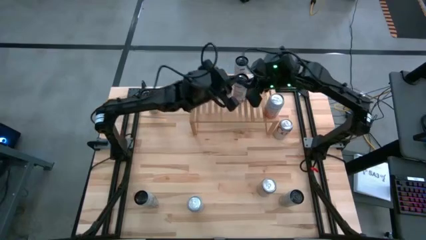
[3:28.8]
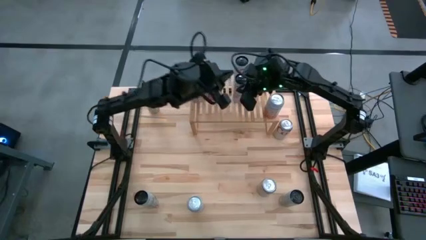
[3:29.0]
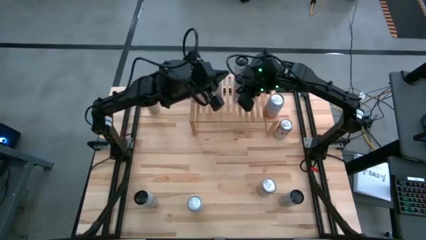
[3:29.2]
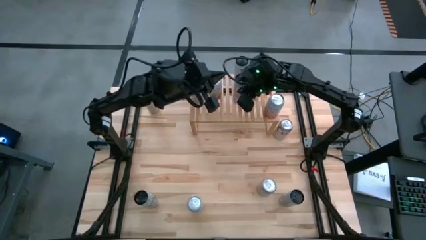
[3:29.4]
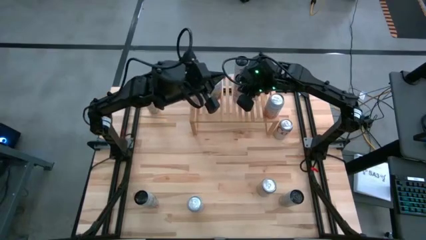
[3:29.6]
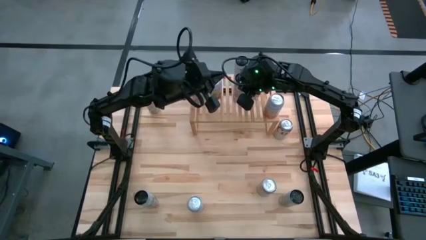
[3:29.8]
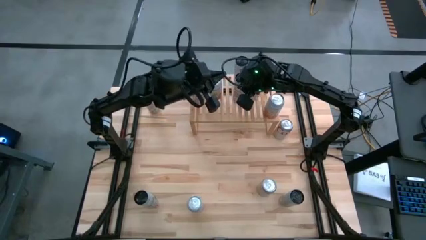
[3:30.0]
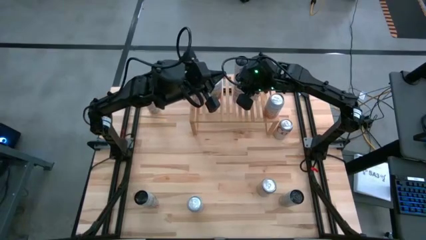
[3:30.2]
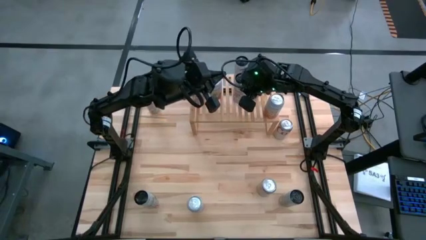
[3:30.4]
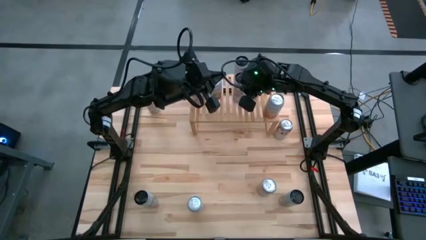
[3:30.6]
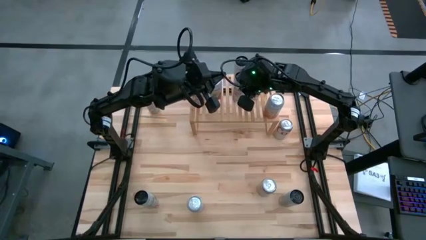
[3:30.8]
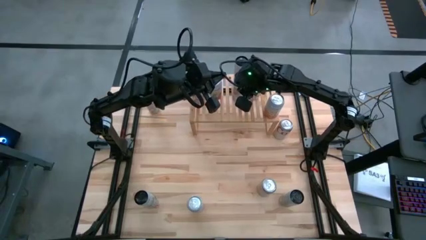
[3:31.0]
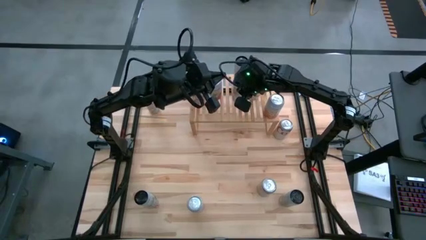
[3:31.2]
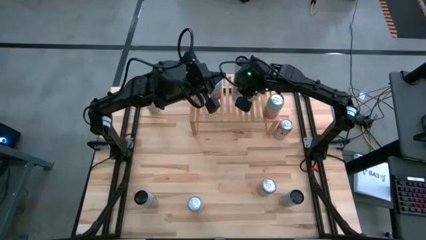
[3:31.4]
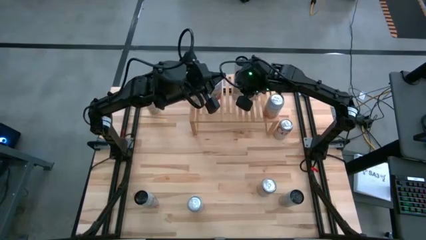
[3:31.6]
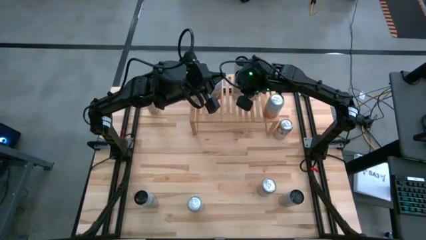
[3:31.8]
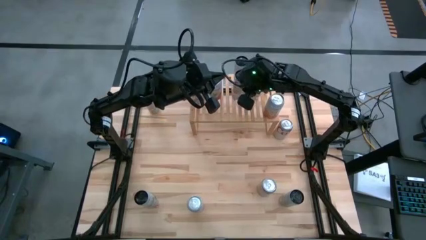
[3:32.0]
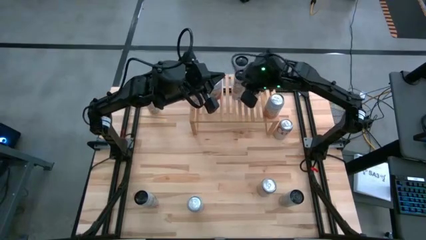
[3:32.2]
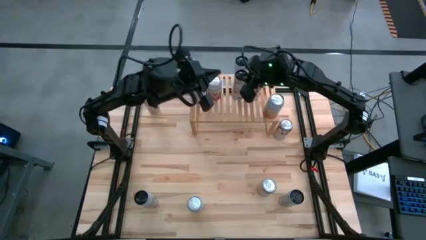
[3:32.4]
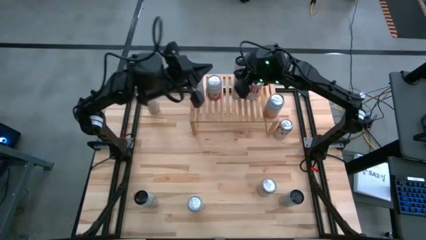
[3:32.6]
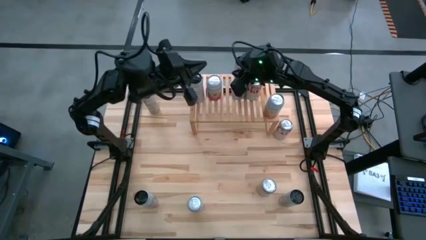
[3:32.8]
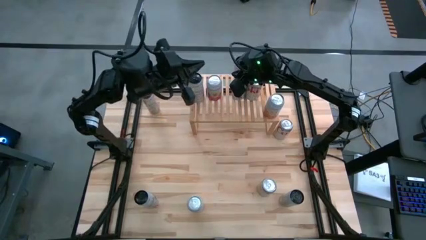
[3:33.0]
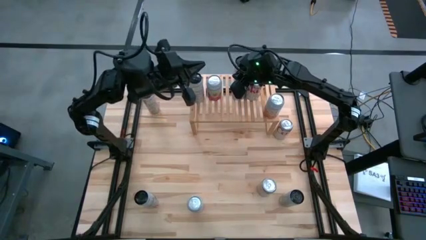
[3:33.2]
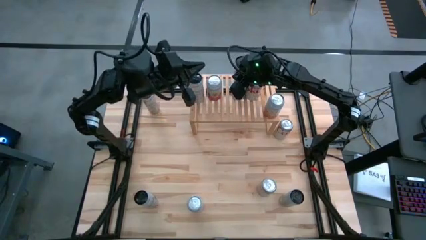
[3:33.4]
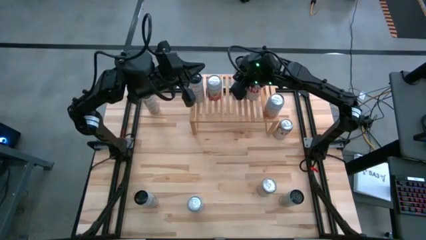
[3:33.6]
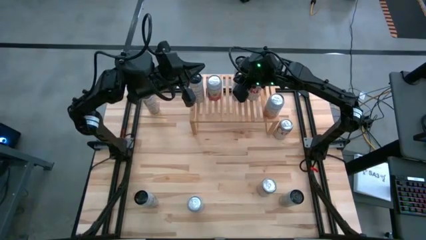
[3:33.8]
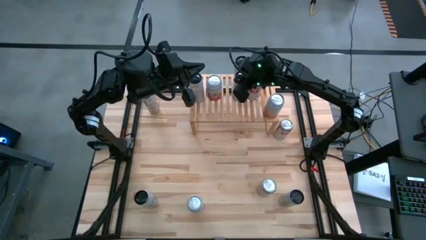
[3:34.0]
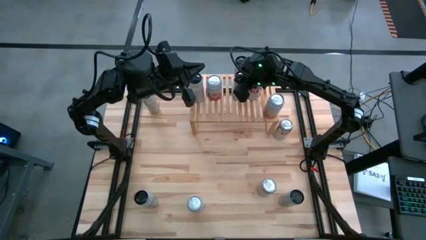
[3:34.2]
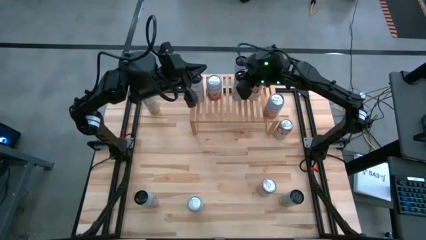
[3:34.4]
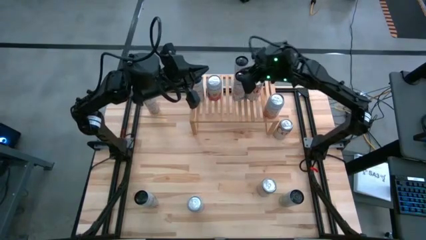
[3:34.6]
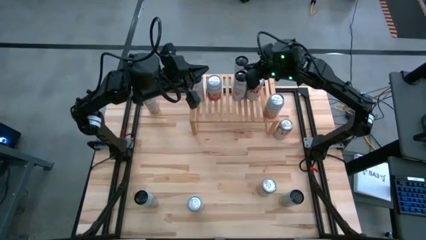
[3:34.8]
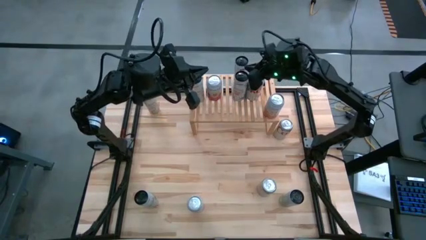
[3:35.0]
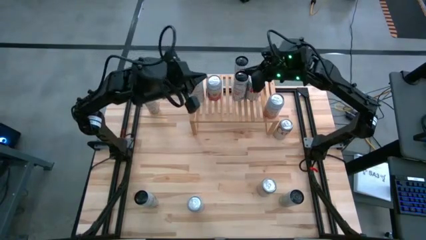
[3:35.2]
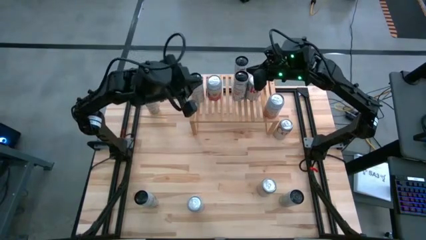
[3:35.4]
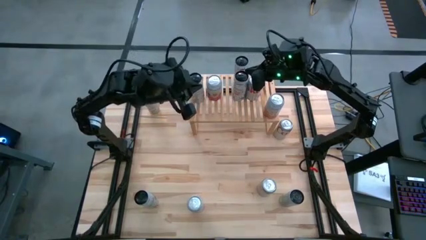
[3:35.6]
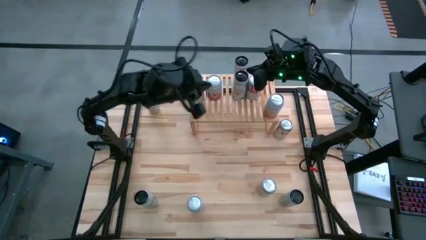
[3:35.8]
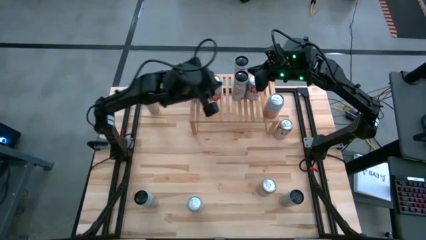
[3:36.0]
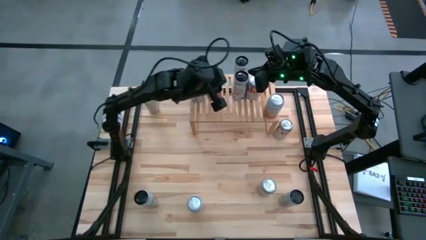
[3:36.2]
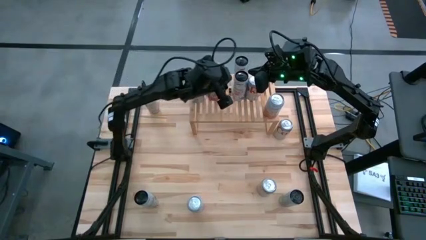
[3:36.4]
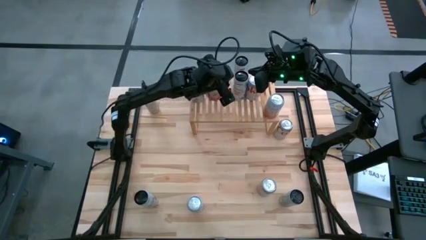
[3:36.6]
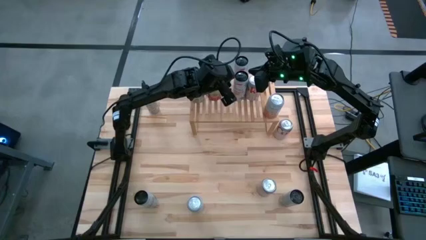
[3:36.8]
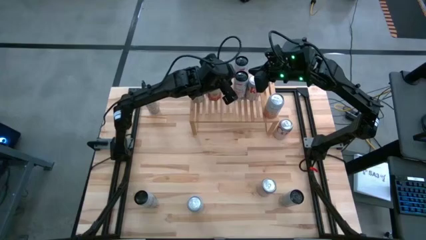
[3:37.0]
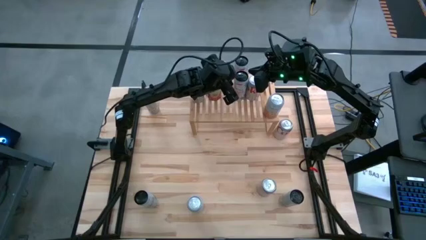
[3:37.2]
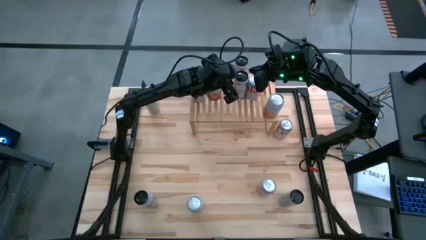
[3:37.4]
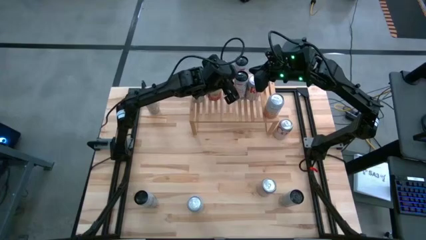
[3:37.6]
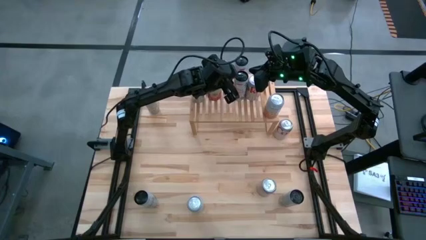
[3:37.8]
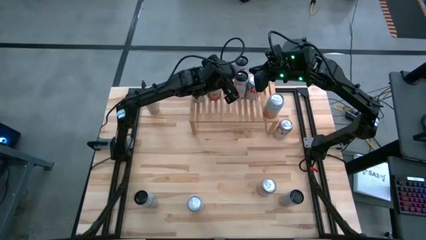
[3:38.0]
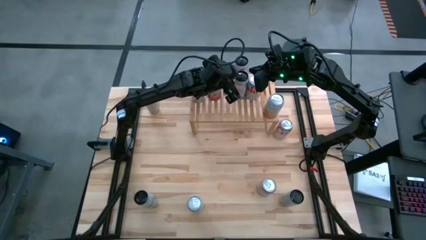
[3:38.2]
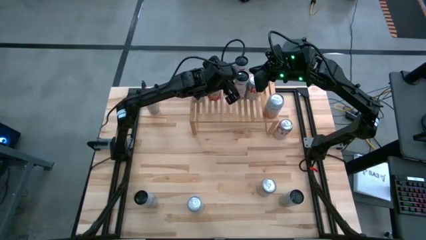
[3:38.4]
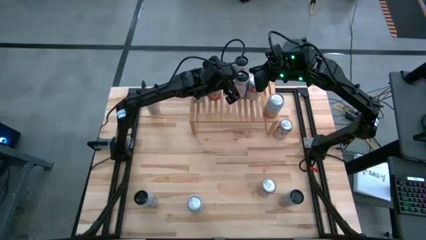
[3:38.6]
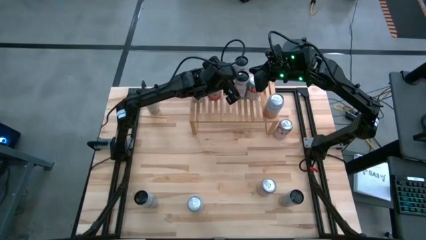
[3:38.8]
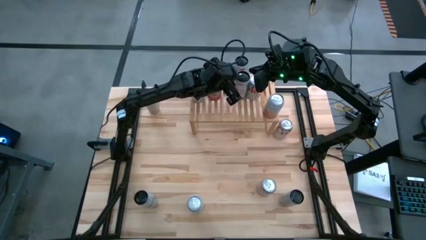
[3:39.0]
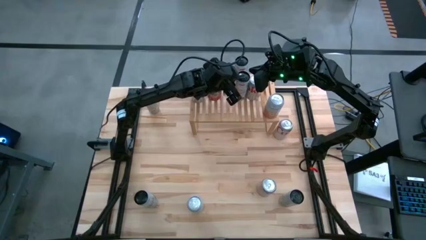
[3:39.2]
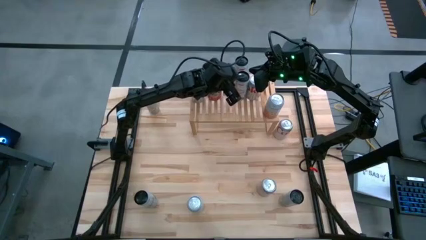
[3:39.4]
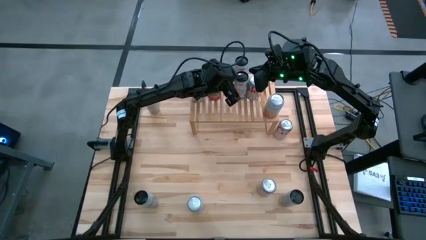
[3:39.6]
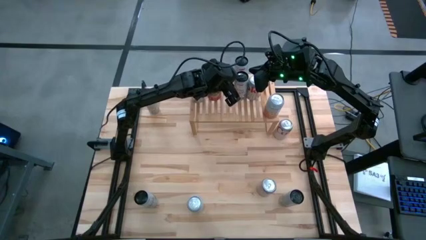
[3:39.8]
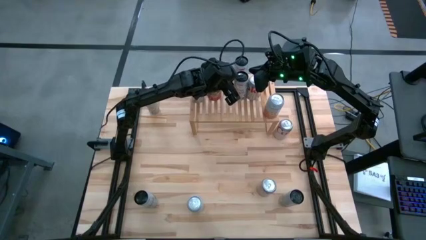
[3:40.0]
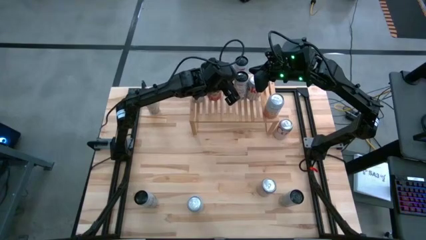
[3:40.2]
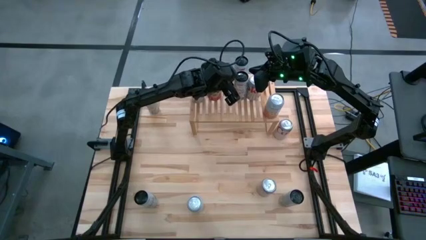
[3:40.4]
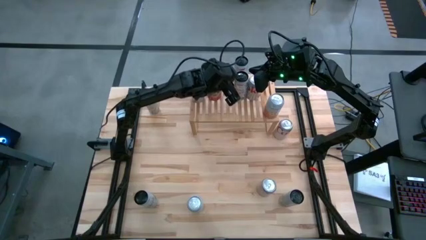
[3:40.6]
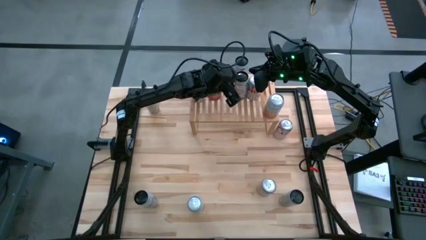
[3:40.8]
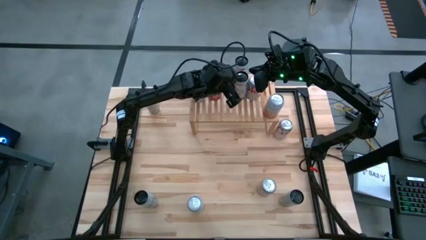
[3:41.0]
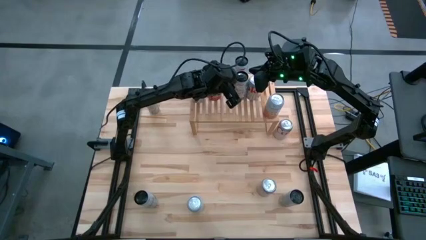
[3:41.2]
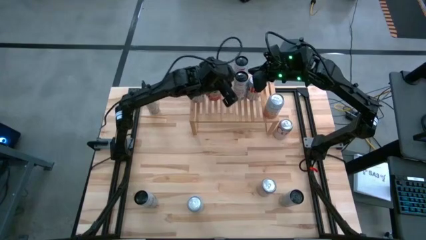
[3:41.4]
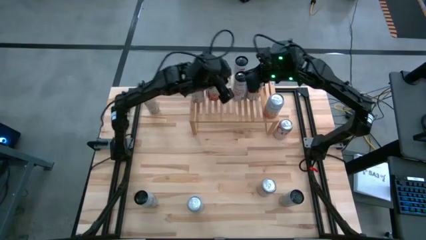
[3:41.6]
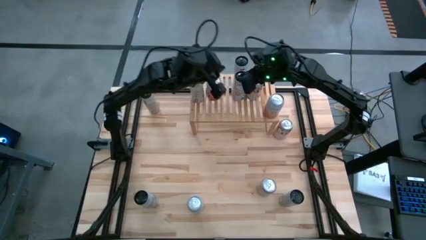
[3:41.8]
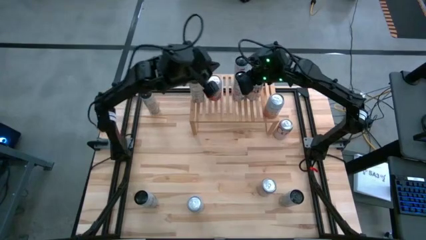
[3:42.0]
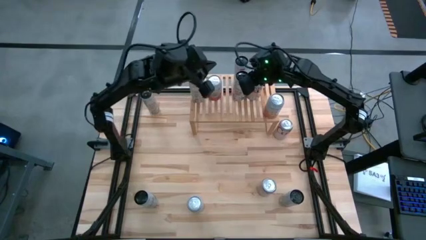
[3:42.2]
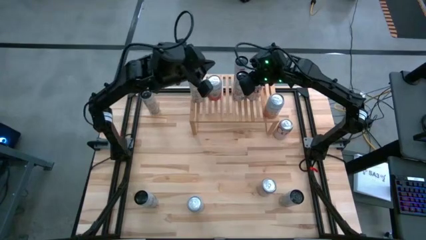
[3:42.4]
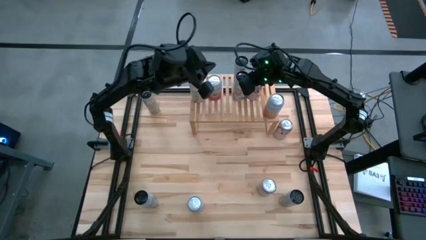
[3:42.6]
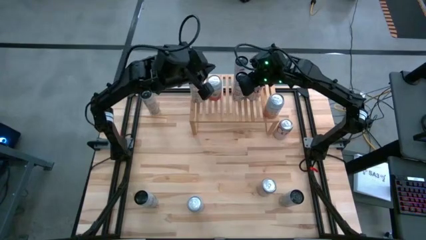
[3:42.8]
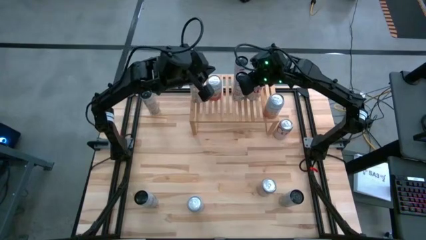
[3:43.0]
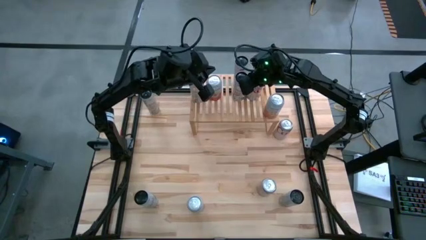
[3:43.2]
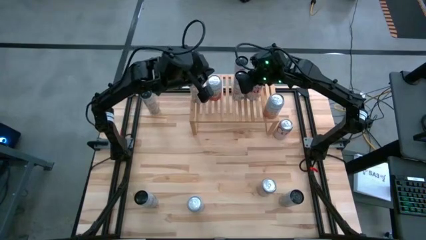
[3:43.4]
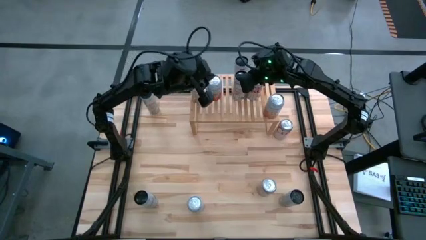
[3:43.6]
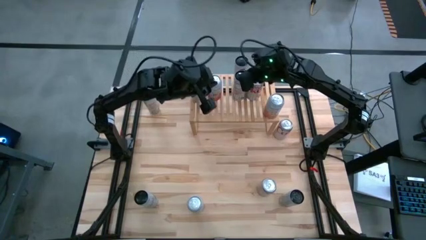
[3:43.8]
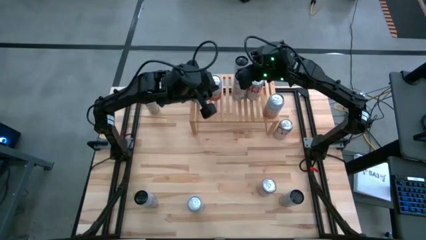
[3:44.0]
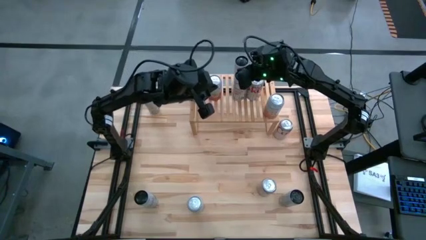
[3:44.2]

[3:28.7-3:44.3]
Task: Place canned beverage on shelf
Put the left white soda can on the shelf aligned with the other white soda can

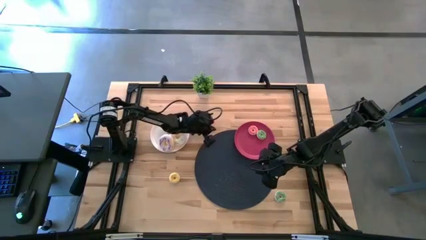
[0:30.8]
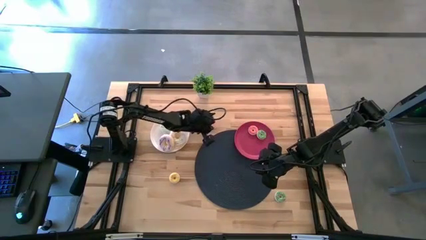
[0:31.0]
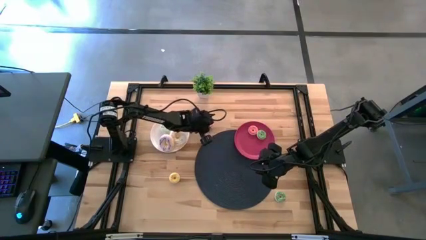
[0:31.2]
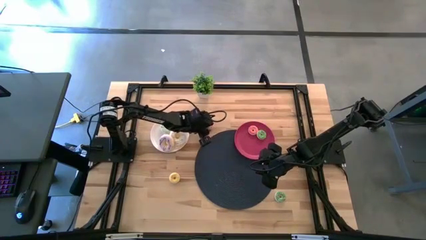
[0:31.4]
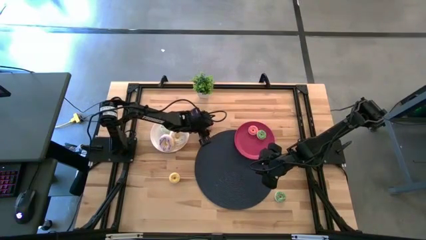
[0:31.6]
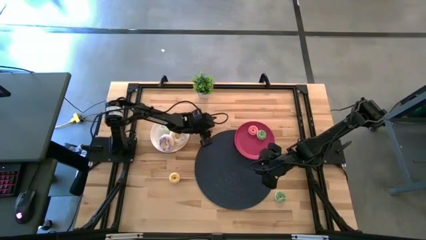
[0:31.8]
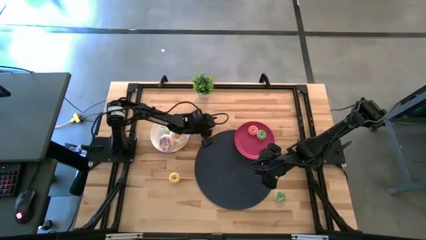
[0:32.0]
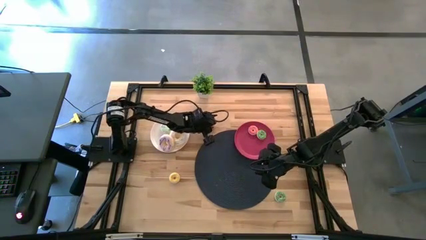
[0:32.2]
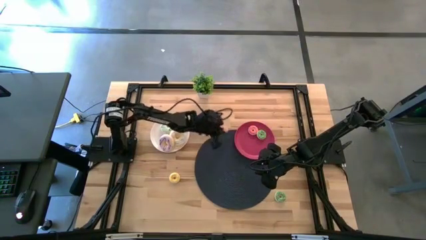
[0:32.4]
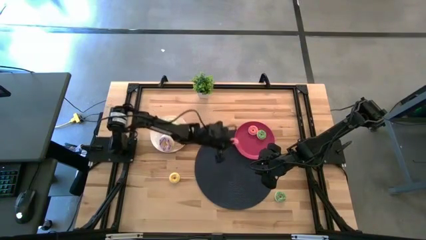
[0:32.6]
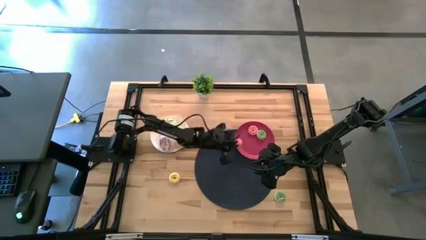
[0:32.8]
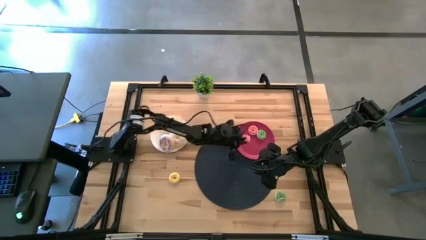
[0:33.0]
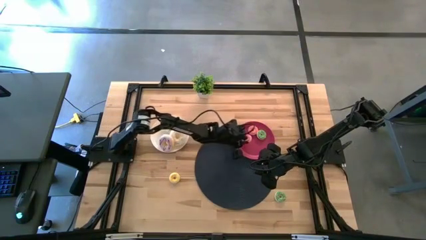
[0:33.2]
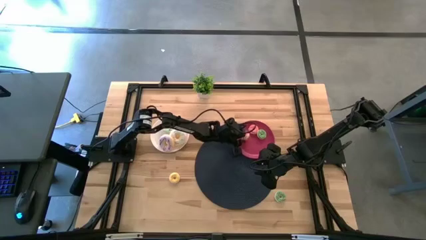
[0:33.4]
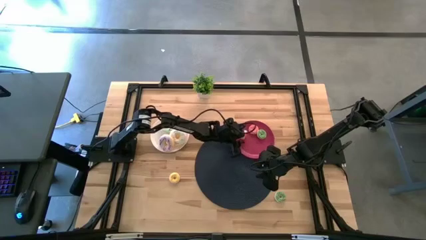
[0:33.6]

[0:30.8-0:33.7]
Task: Pick & Place donuts
Put the small pink donut onto the red plate
